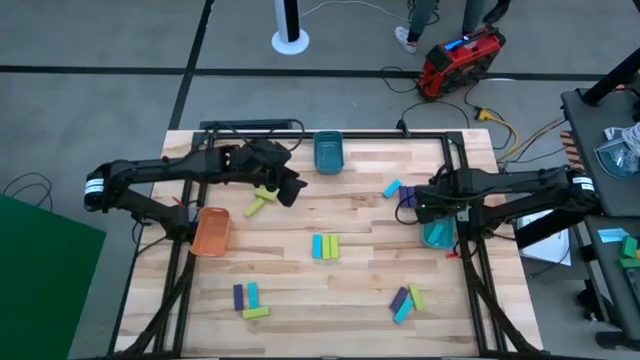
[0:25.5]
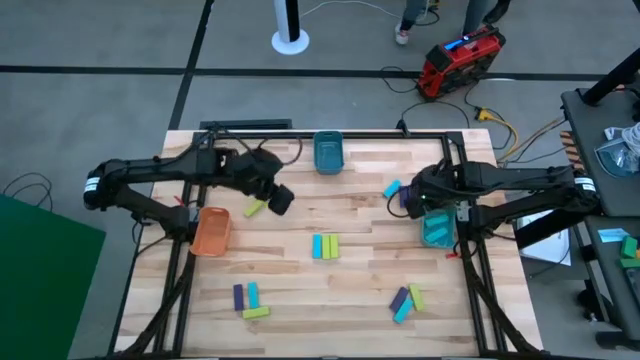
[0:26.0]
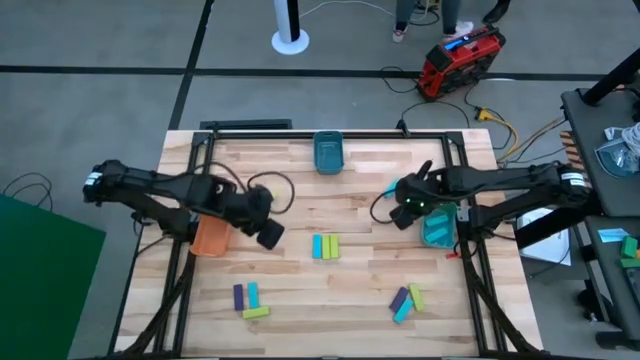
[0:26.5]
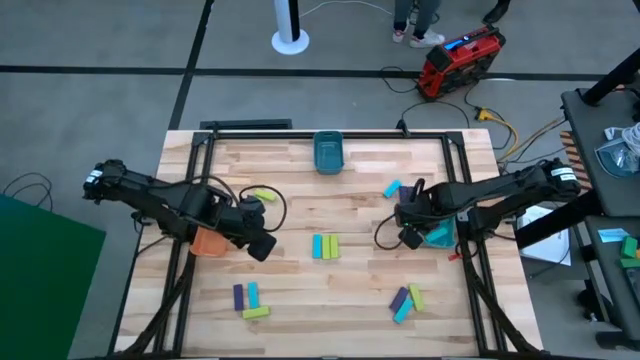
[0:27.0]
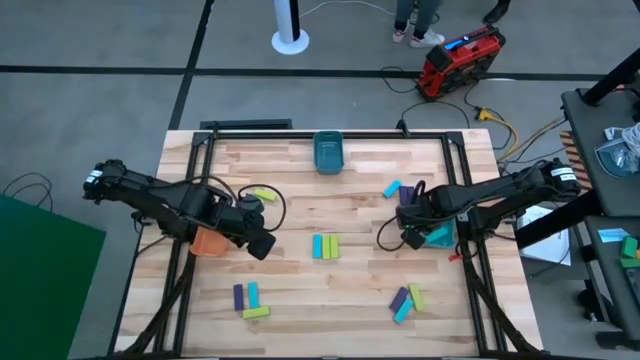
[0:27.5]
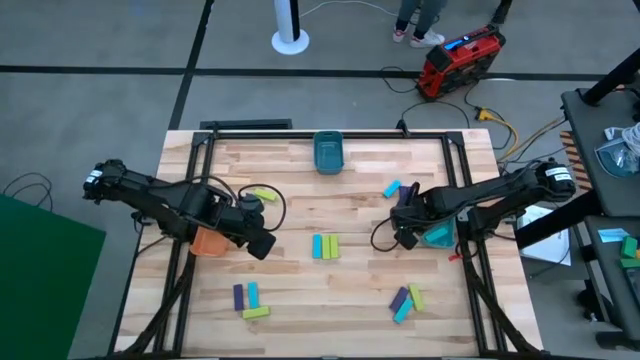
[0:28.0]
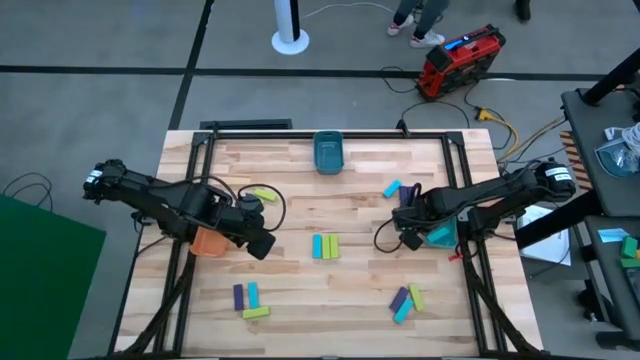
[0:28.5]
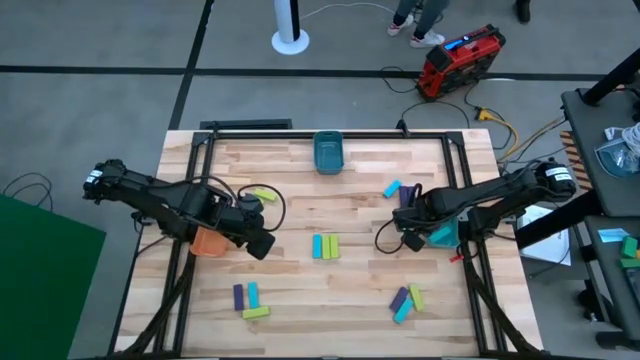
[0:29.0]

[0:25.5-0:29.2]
Task: Sort blocks
Adjust the light blue bin on the table

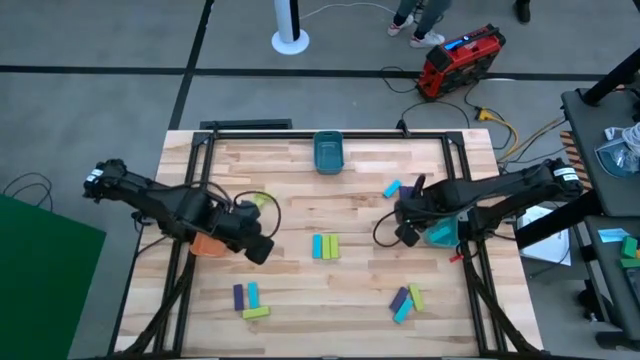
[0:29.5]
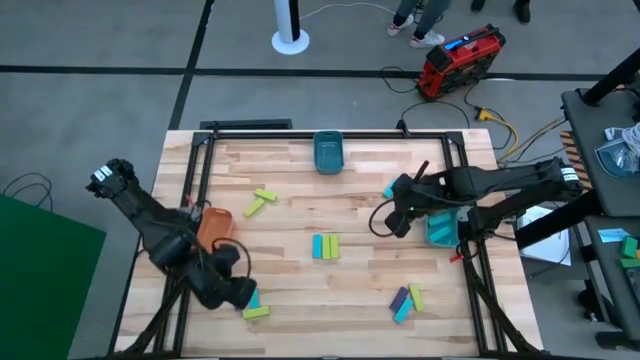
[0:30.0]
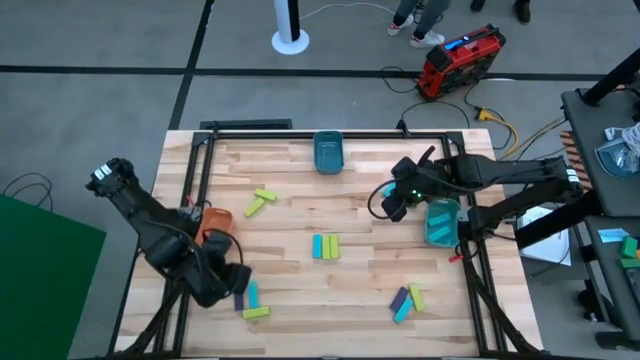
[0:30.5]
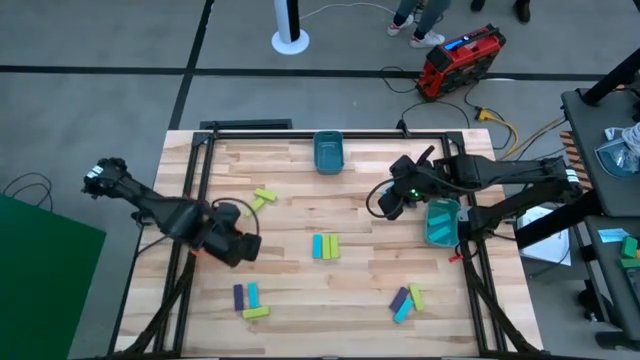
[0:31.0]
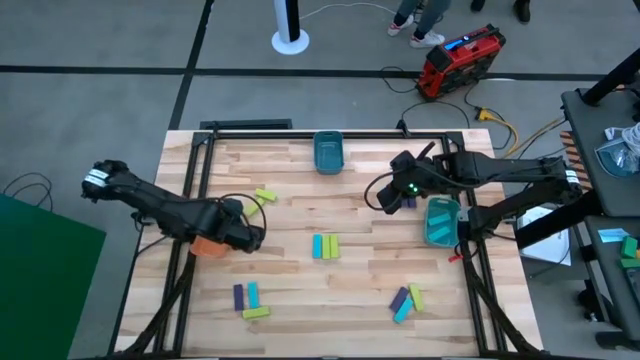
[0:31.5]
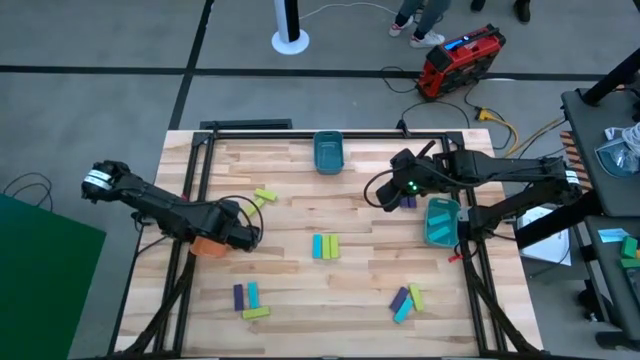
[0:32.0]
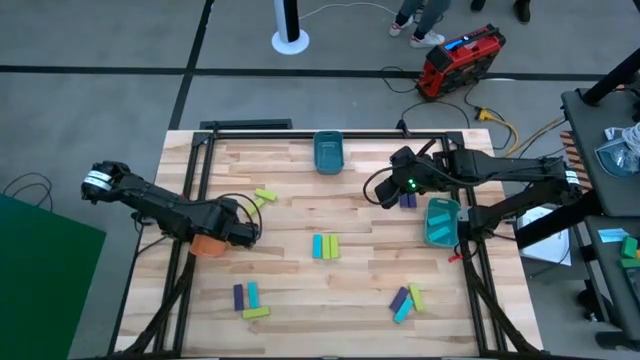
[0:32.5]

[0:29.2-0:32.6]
Adjust the orange bin on the table

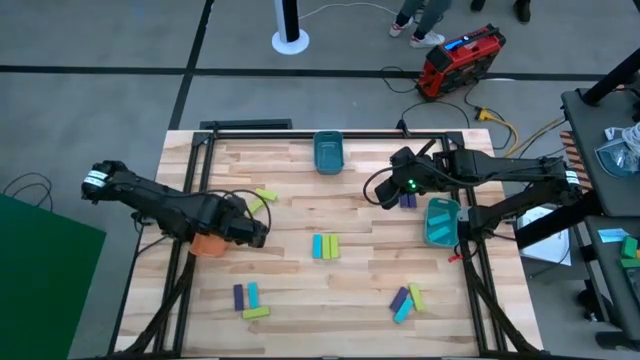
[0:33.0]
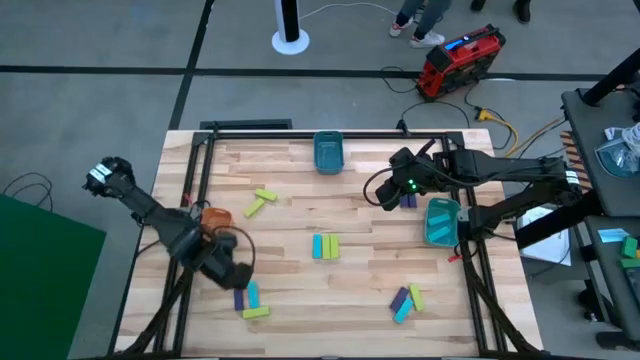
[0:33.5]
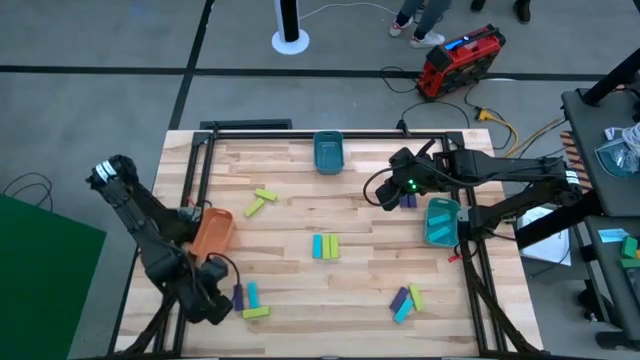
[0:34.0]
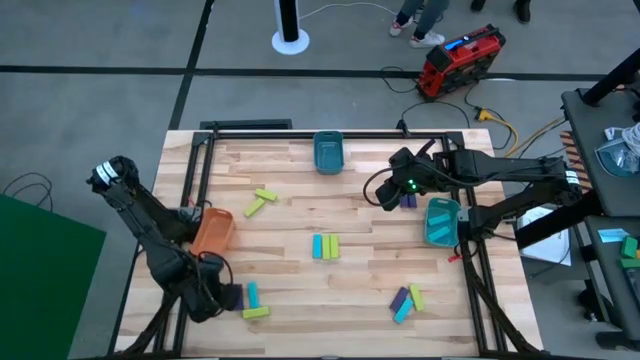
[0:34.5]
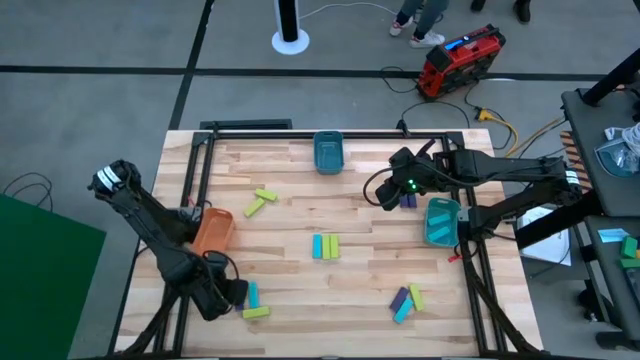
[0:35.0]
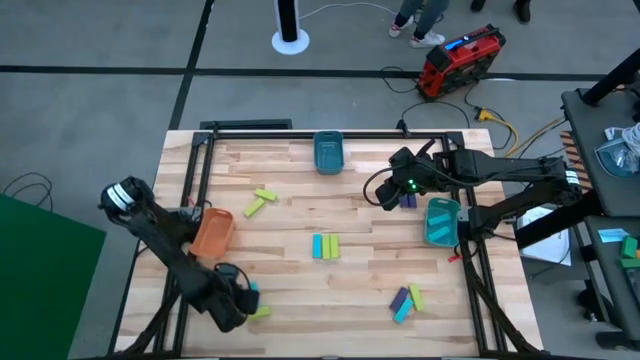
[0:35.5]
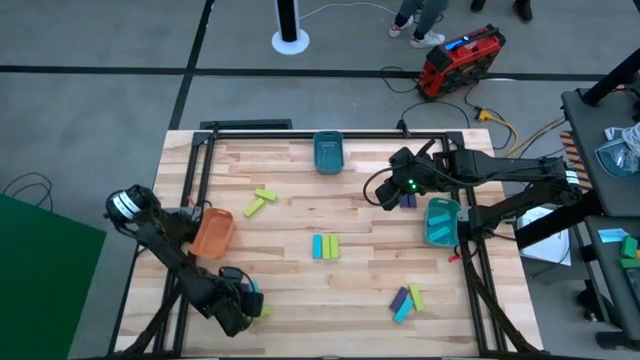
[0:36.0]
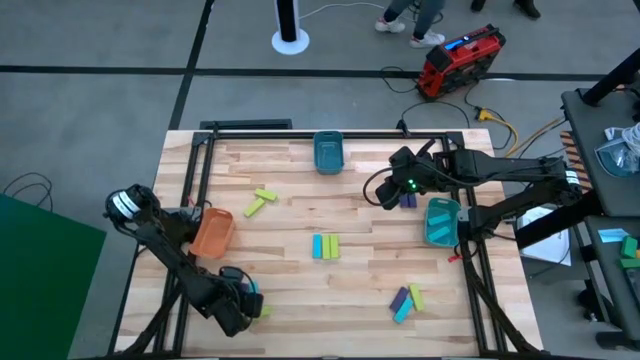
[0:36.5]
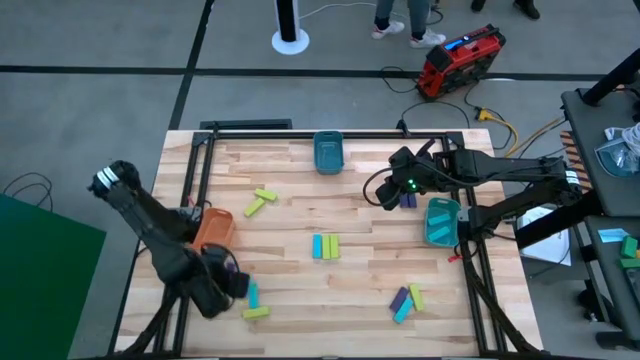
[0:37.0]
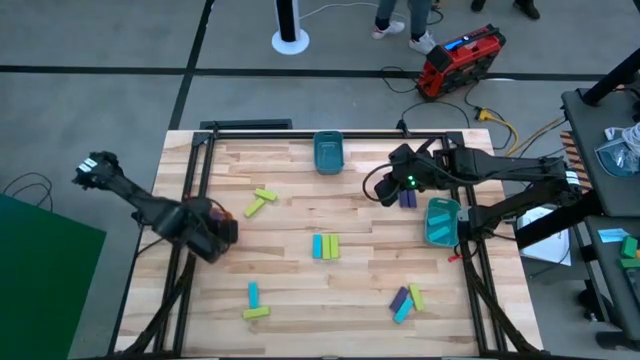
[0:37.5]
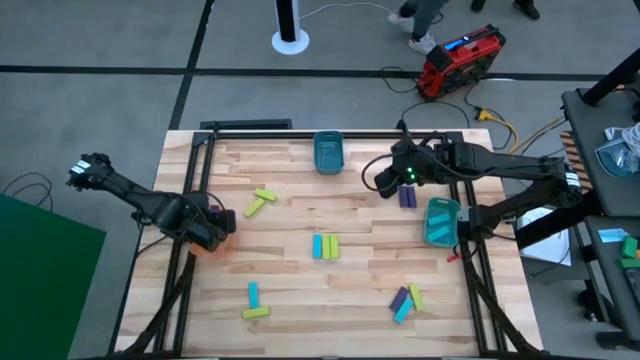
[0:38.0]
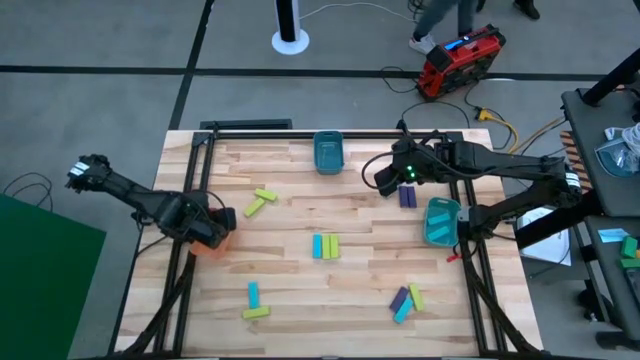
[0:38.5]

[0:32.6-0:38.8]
Put the violet block into the orange bin

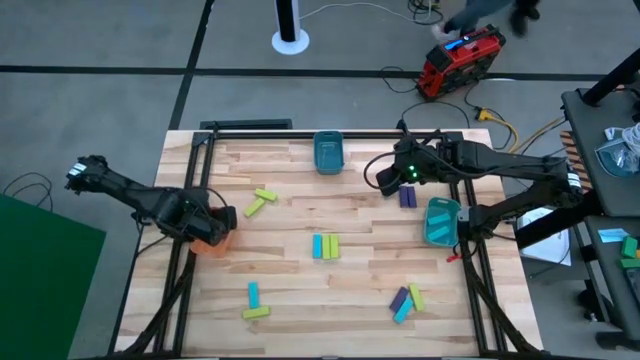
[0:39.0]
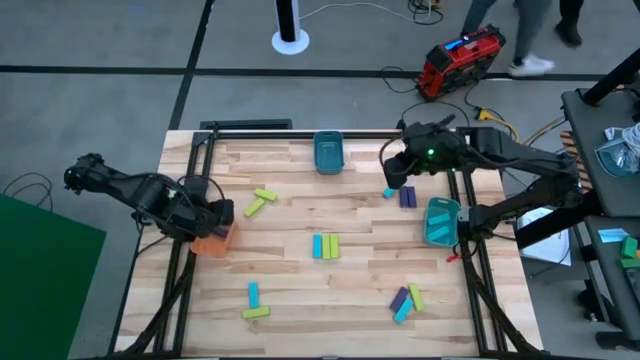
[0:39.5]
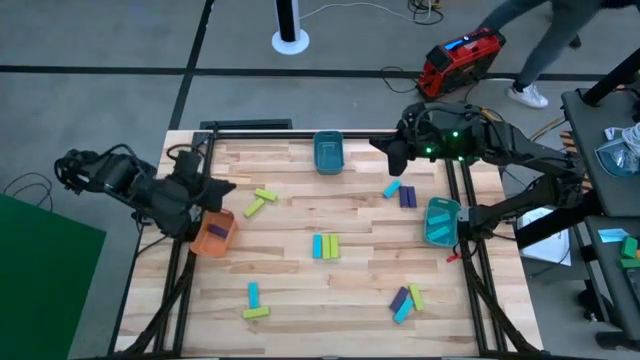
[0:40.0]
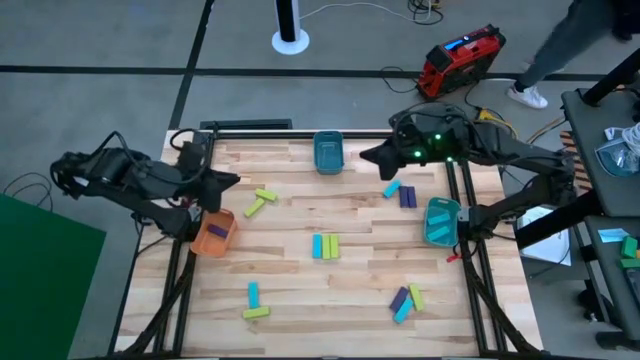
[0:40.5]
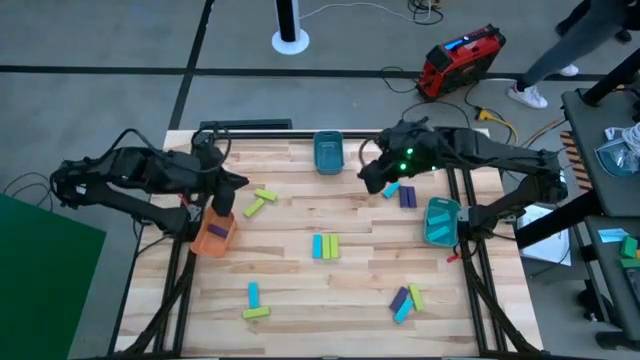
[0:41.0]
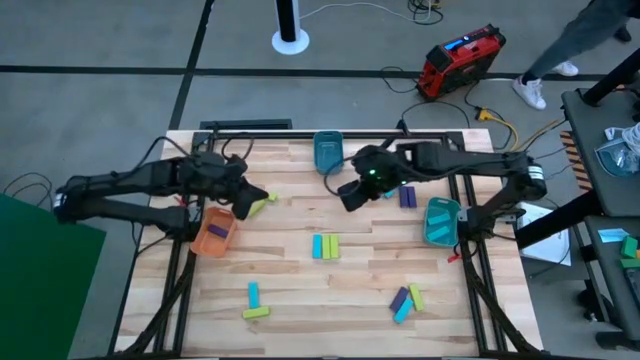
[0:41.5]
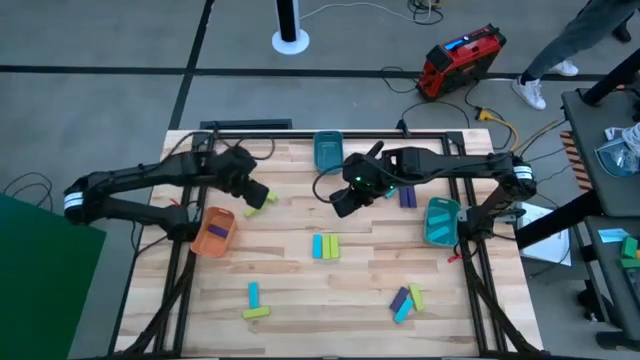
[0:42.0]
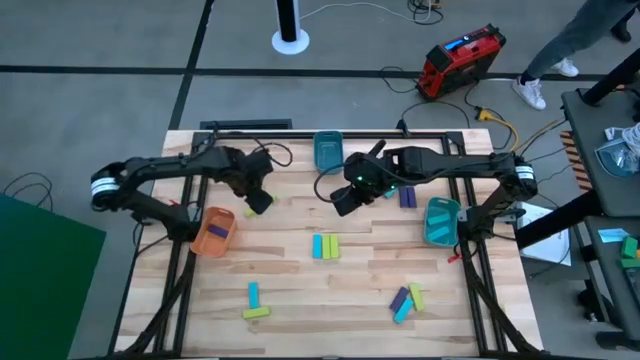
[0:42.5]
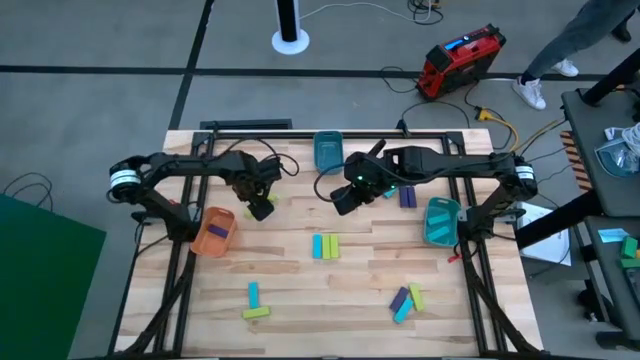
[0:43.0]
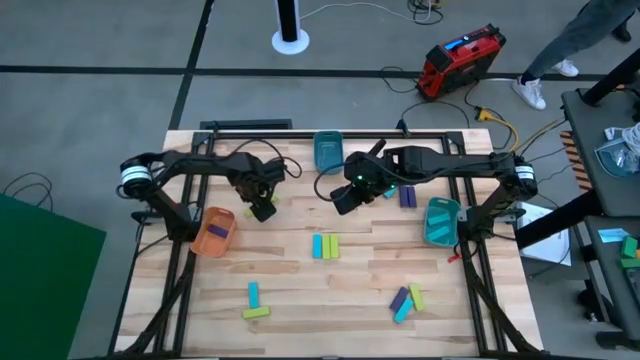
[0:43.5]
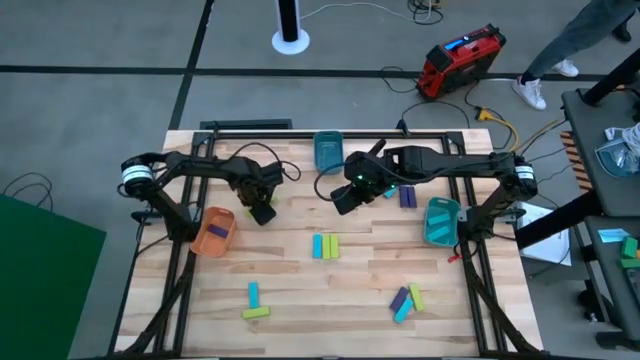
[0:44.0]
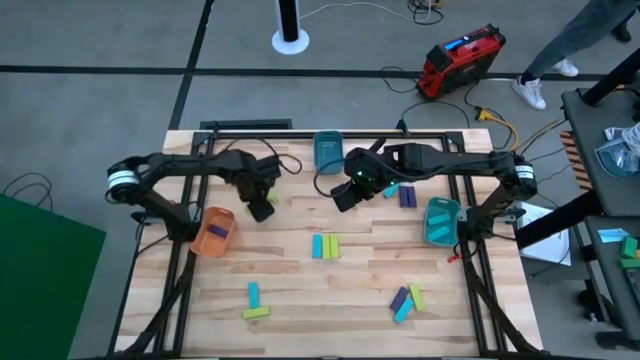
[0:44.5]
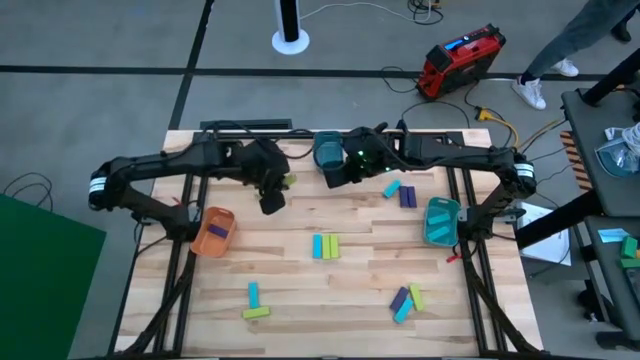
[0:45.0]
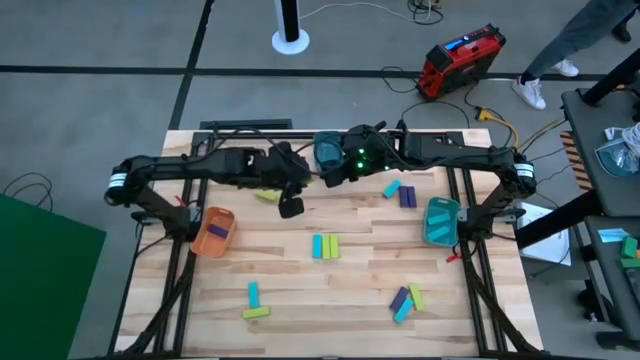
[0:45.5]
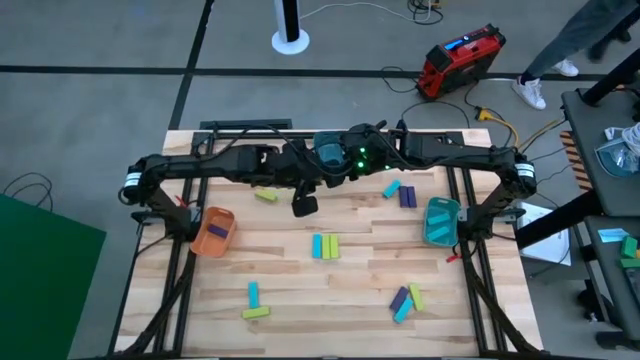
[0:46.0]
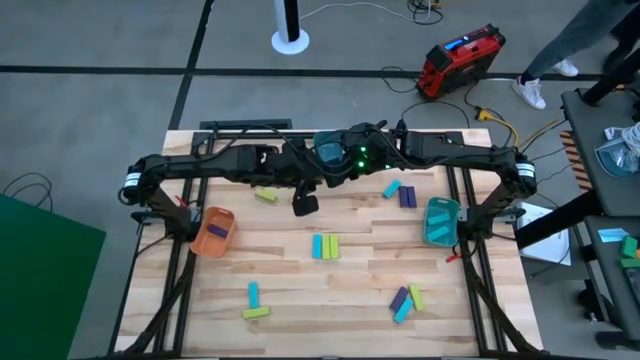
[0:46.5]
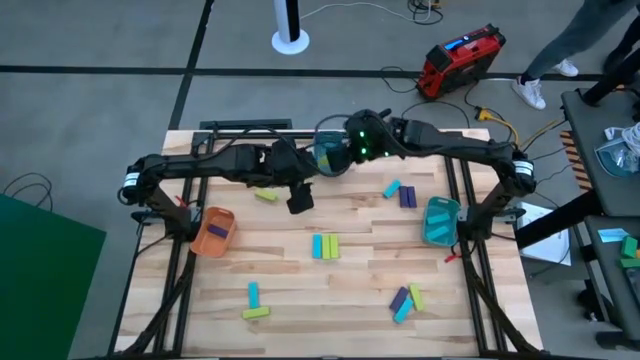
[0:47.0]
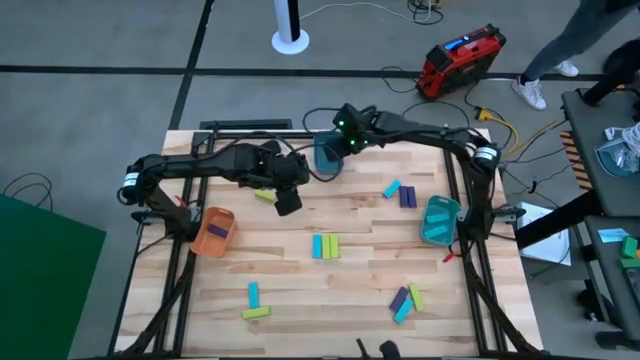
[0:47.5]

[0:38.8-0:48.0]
Put the green block into the blue bin
